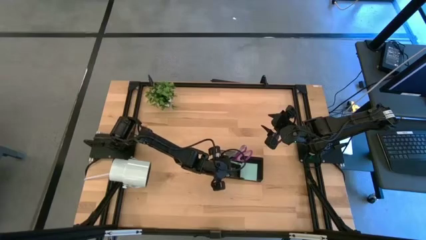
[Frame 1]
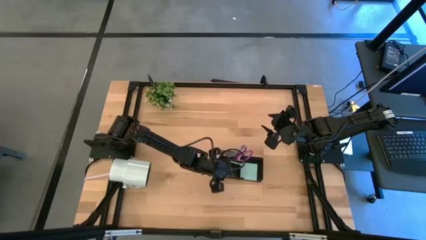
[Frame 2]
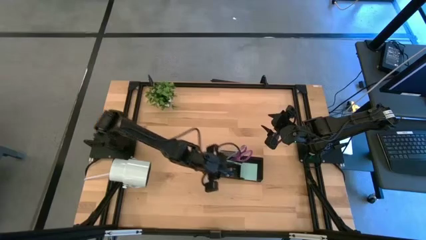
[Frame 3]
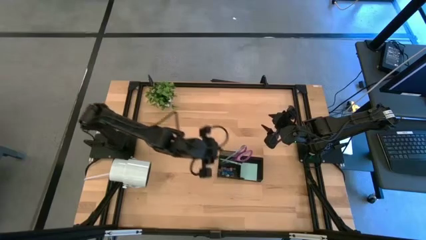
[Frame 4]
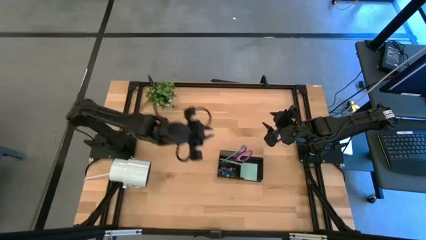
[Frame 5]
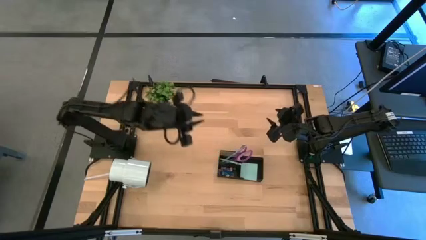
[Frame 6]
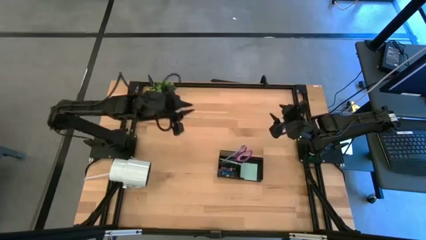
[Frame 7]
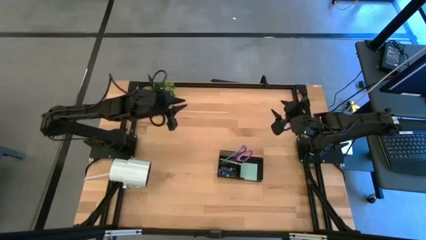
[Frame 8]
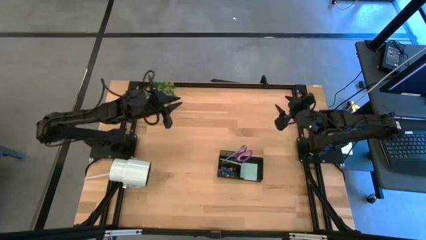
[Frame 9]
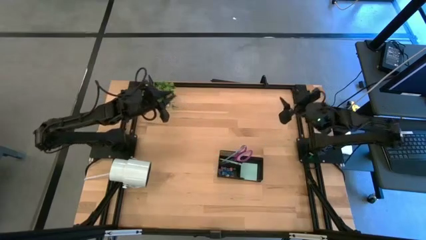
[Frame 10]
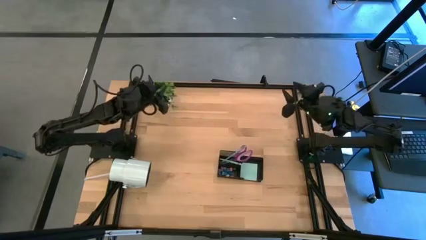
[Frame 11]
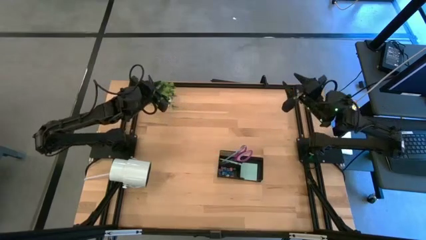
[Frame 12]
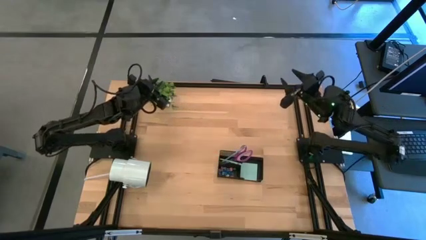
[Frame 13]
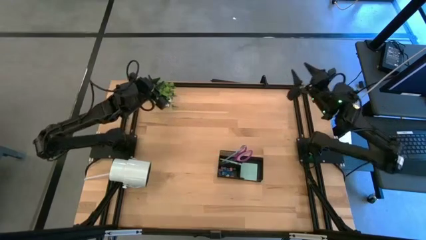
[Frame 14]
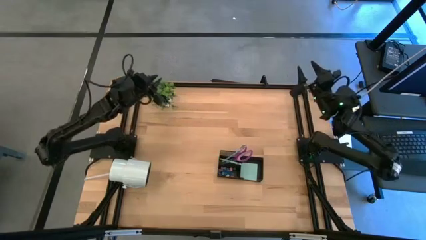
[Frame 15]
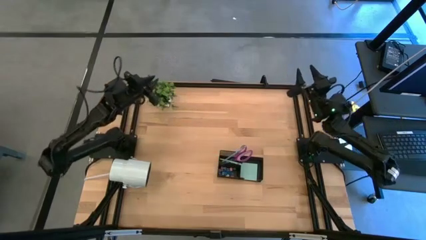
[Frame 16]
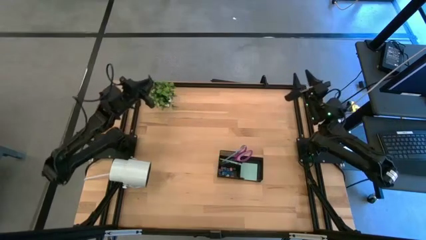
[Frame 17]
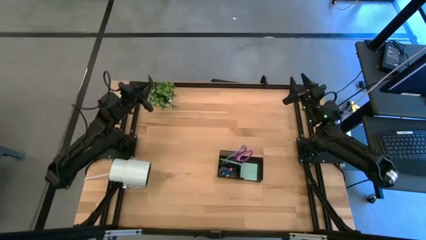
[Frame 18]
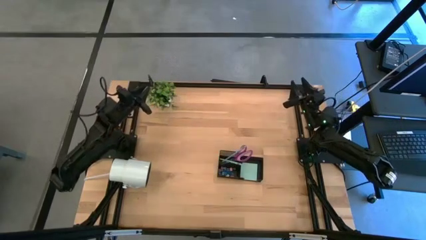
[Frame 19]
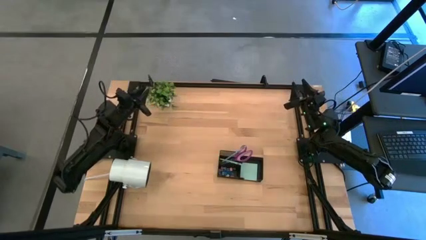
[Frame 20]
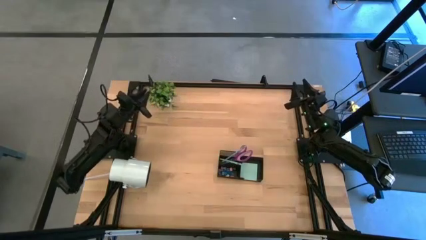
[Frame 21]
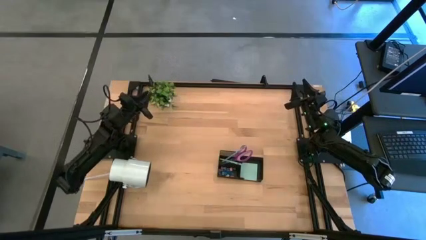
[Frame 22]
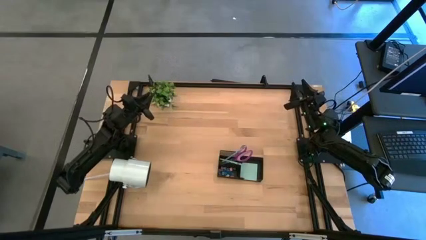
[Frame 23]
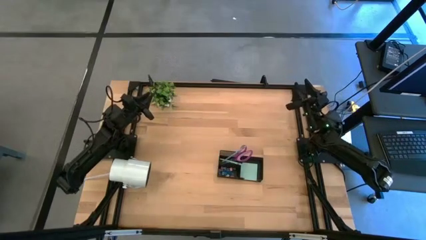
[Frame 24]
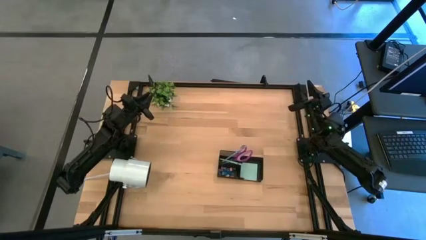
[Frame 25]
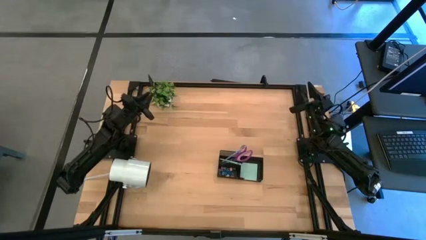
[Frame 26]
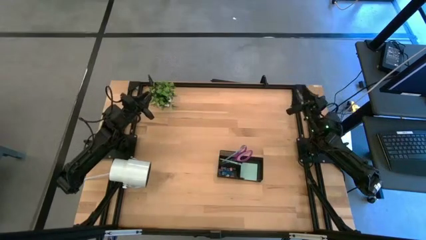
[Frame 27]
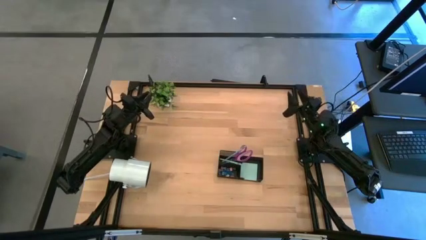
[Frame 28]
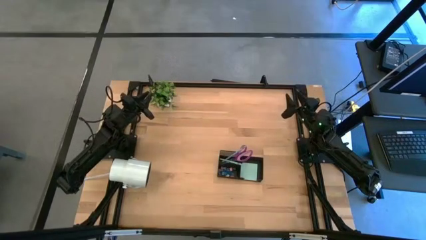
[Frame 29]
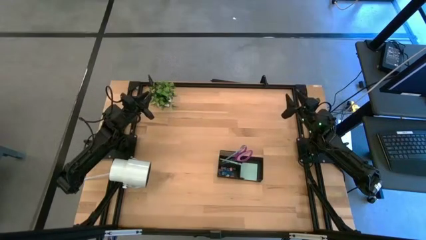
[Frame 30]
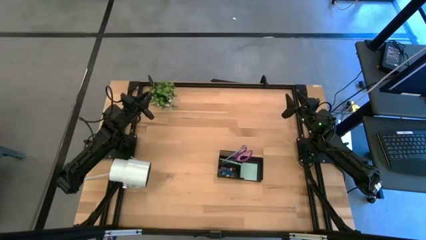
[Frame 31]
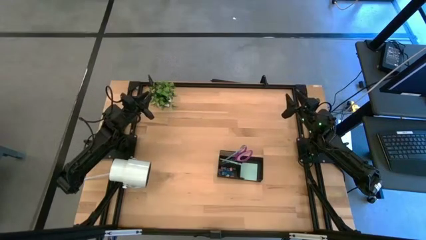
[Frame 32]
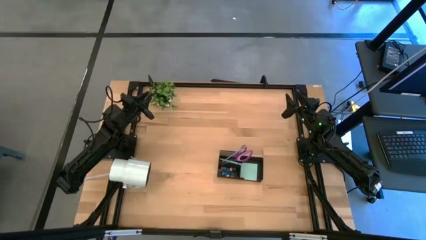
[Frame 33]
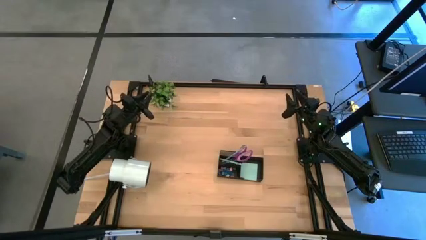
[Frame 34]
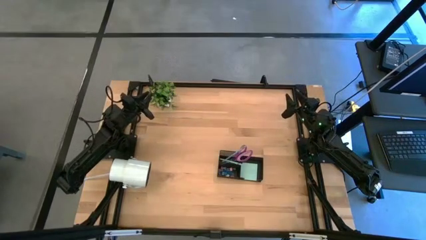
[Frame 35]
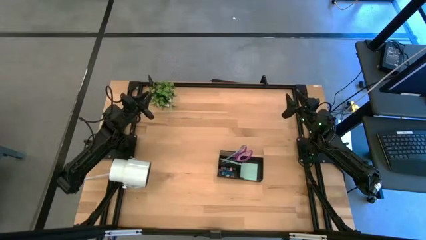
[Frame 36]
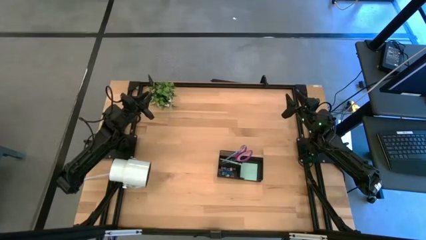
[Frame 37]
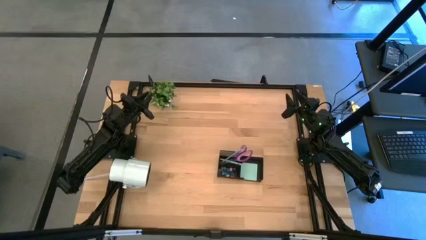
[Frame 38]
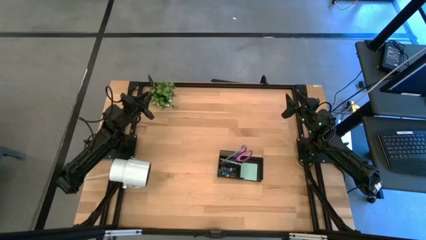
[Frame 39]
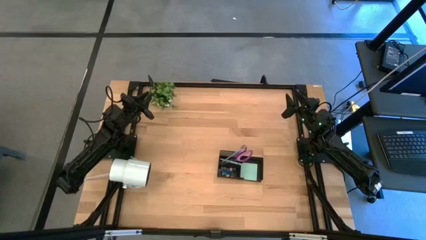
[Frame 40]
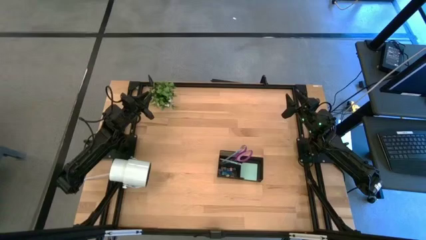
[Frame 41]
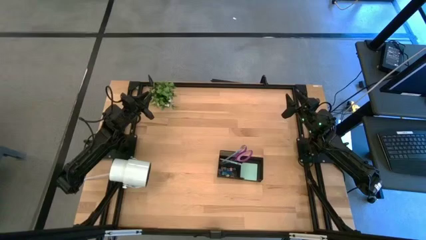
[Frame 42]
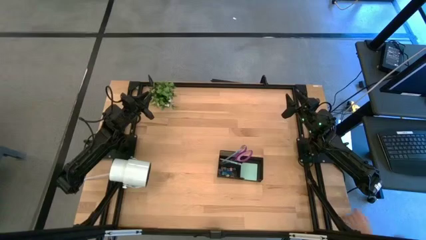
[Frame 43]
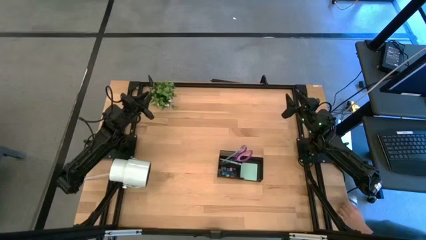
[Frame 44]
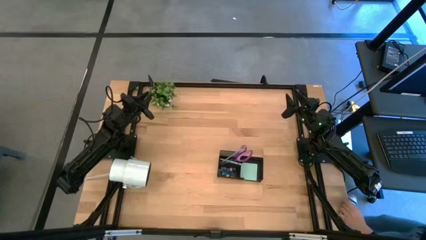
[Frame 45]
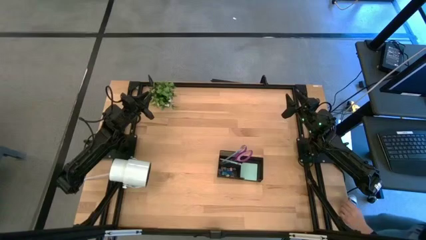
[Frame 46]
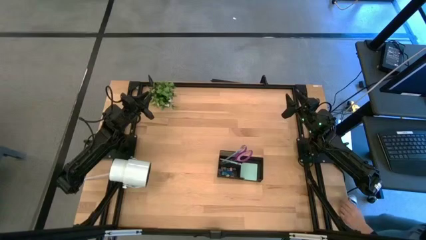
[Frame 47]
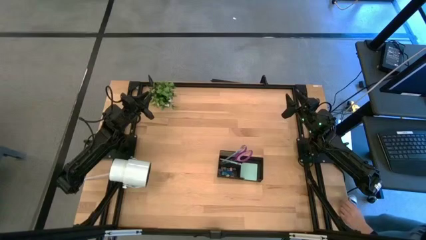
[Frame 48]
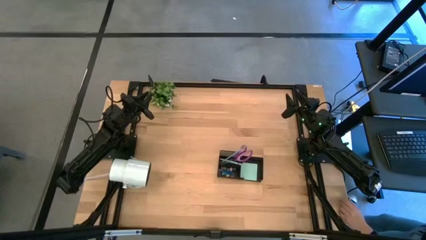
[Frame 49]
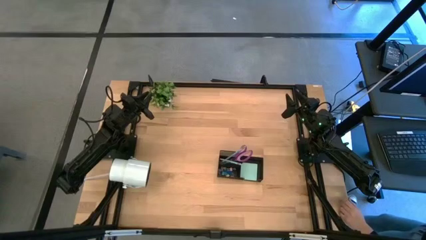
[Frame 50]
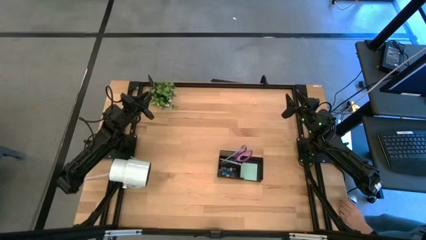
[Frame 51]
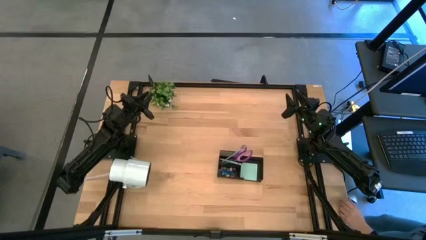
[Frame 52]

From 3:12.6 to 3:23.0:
Task: Pick and place office supplies into organizer
Return to Home Position

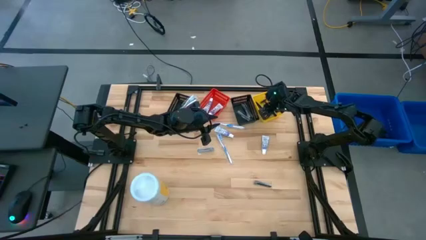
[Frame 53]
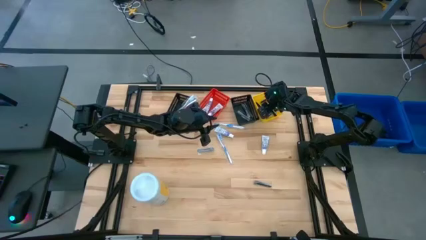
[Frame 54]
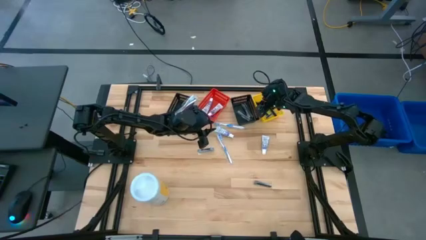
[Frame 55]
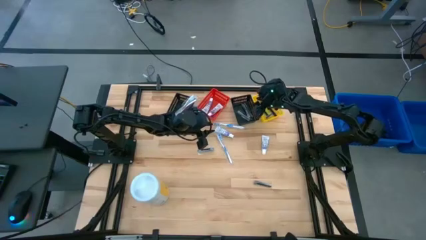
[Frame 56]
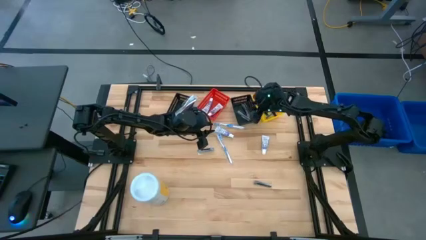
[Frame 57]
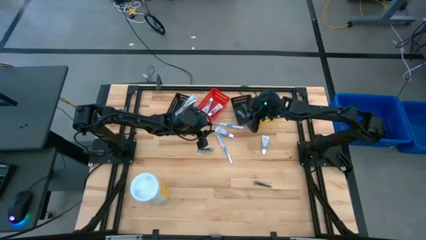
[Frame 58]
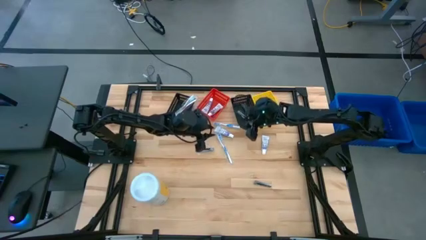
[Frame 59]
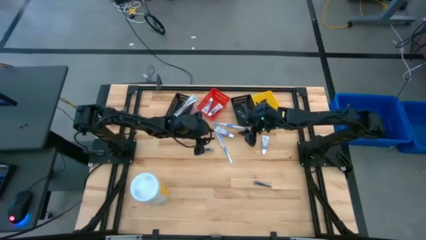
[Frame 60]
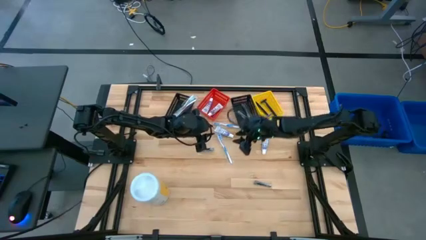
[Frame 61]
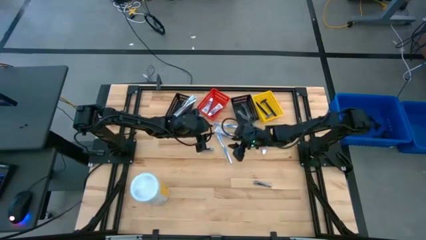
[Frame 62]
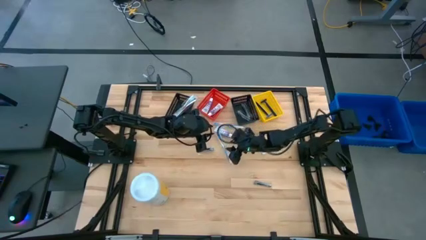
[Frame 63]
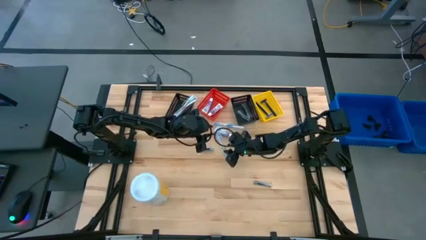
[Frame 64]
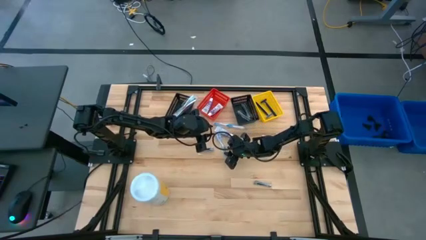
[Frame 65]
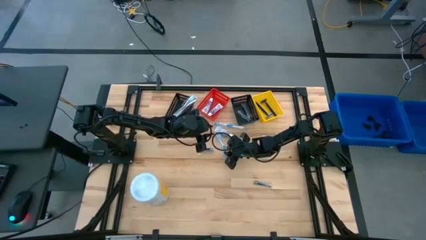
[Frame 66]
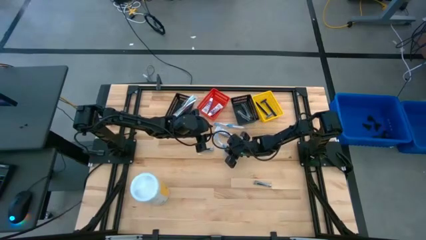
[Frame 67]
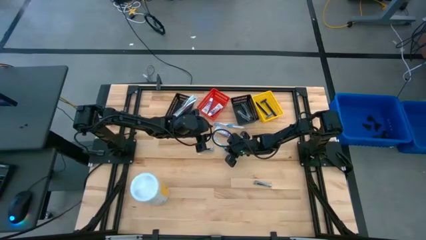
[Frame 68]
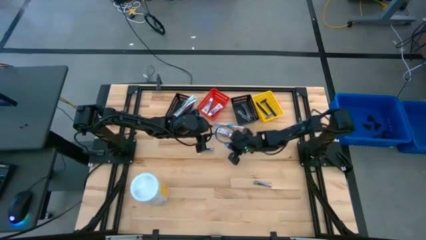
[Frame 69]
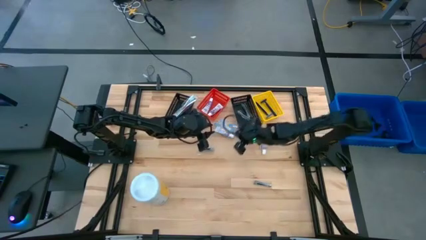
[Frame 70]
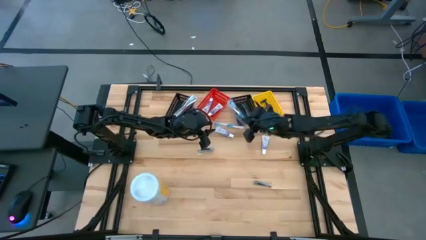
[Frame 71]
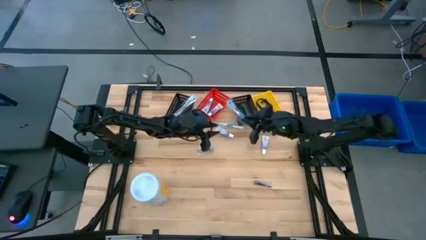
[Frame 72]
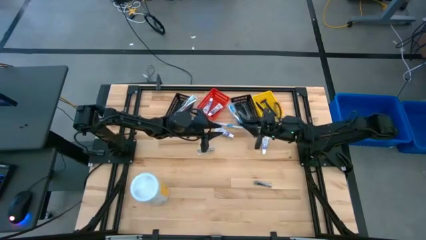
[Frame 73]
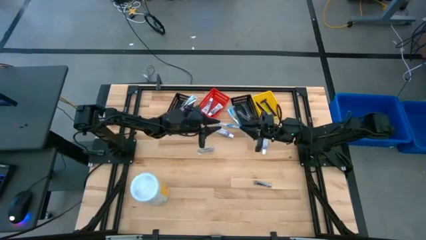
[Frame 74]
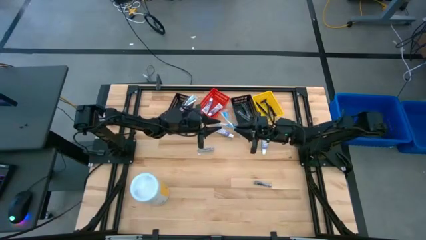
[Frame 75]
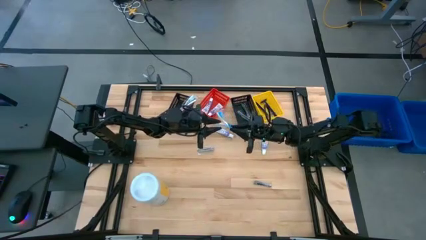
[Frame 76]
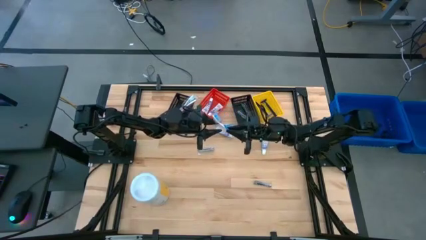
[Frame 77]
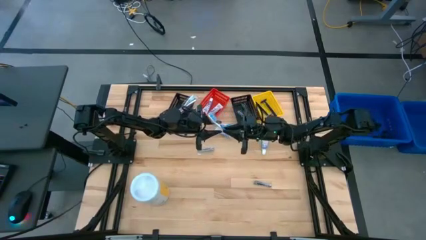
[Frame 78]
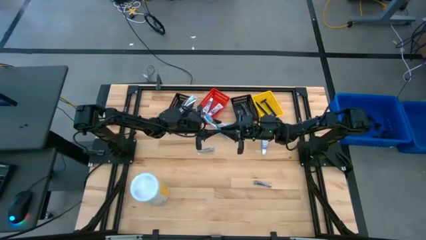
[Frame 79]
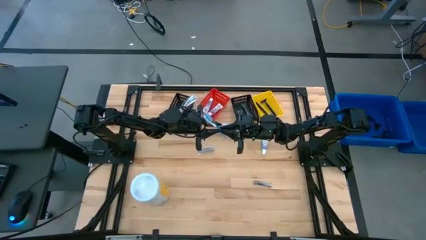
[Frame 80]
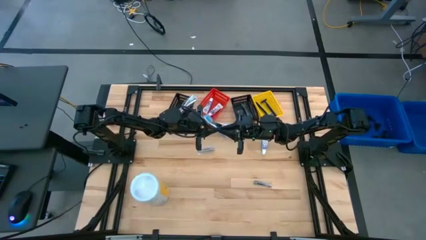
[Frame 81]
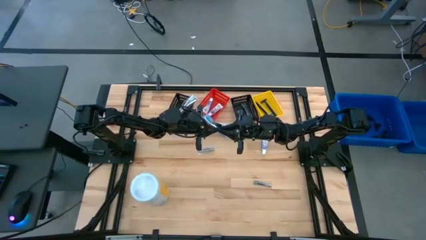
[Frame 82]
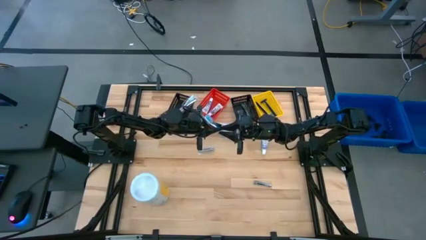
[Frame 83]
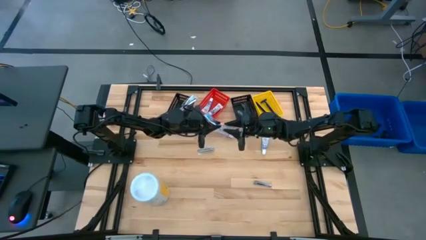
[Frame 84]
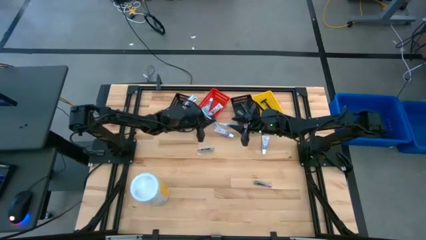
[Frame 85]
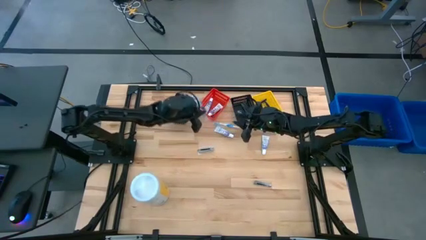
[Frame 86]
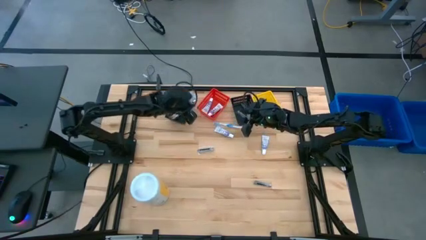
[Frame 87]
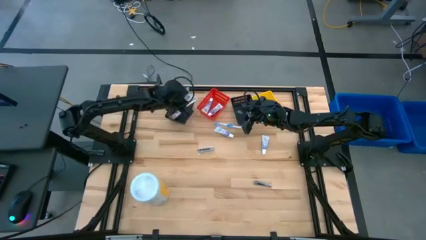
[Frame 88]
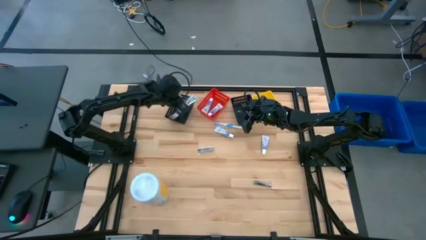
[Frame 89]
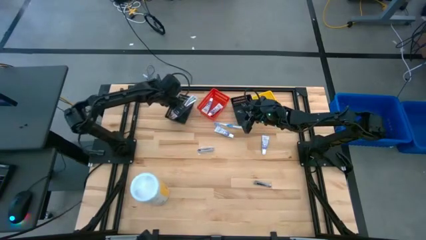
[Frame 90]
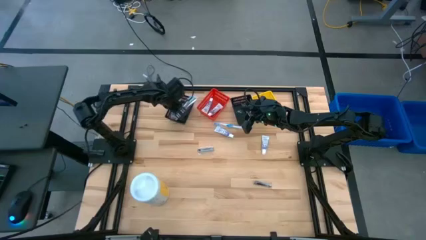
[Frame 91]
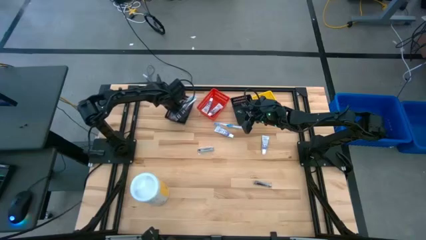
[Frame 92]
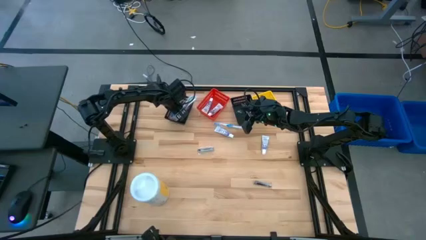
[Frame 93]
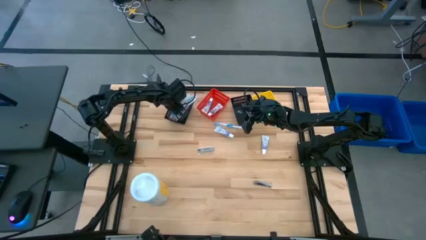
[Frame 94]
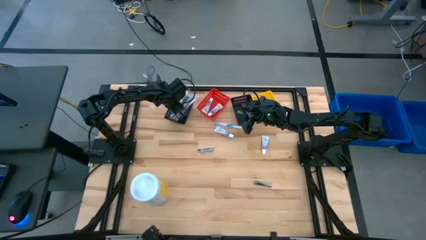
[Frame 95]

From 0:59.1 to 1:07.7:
Task: Pick & Place Travel size toiletries
Put the bottom blue toothbrush into the left black bin
